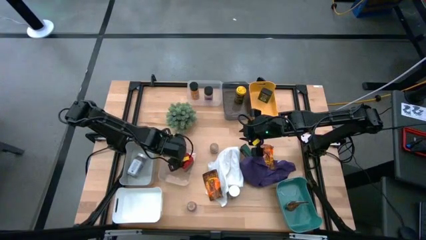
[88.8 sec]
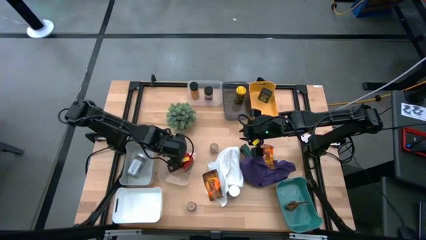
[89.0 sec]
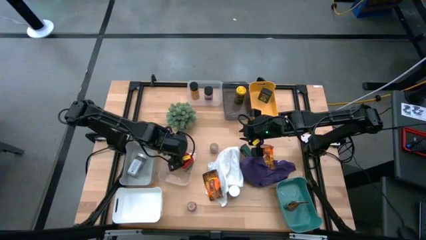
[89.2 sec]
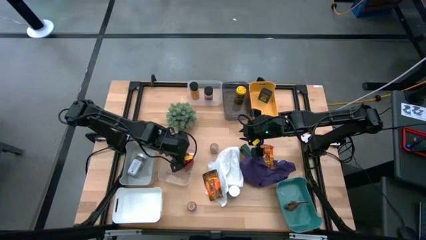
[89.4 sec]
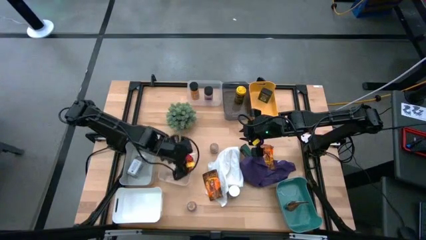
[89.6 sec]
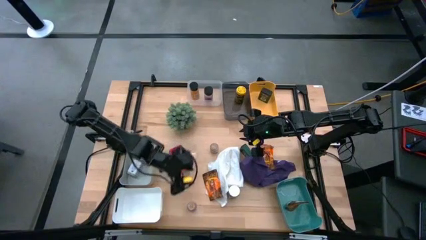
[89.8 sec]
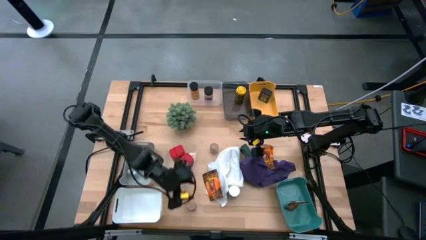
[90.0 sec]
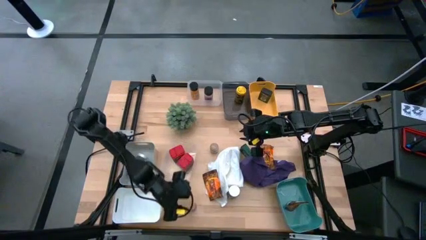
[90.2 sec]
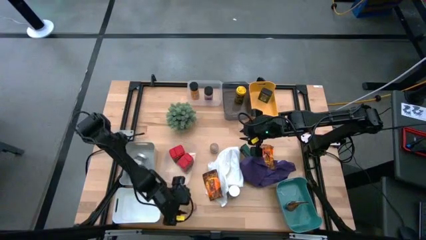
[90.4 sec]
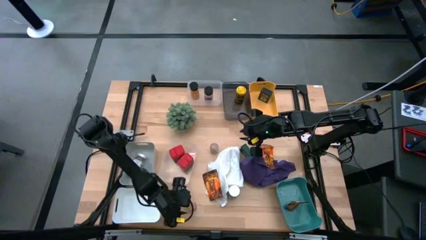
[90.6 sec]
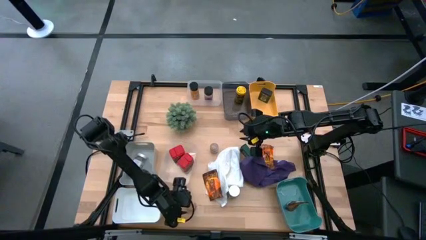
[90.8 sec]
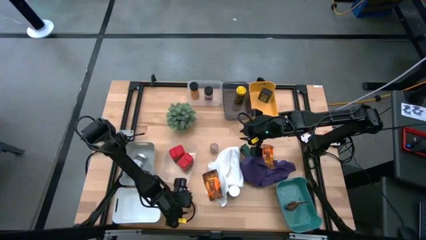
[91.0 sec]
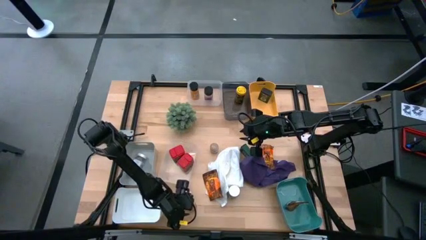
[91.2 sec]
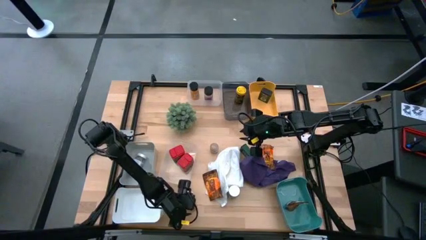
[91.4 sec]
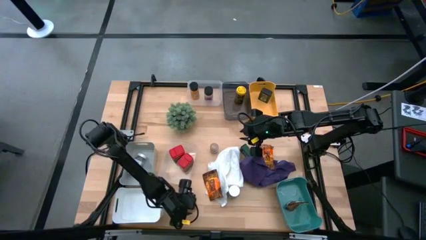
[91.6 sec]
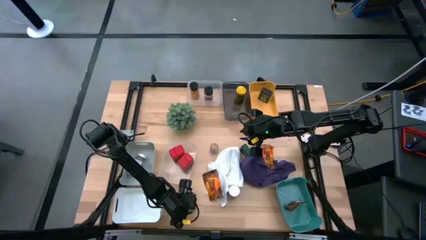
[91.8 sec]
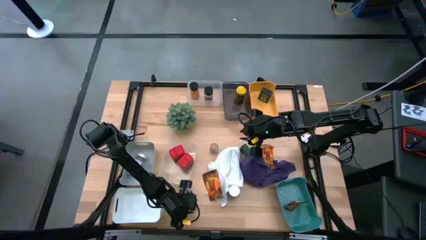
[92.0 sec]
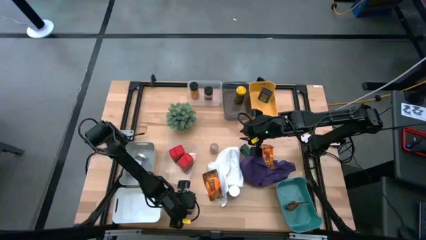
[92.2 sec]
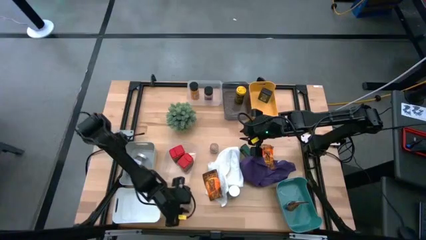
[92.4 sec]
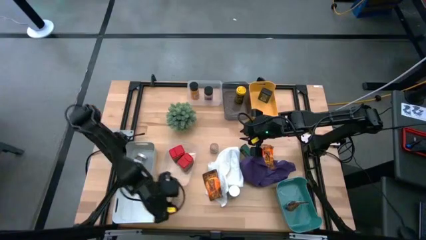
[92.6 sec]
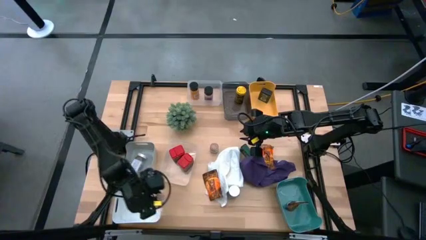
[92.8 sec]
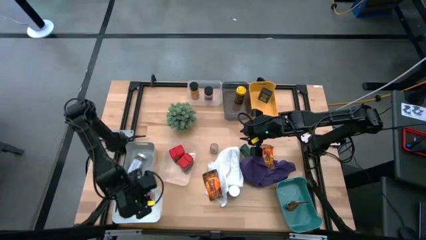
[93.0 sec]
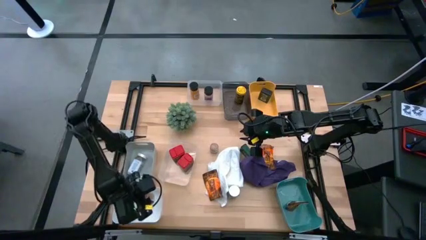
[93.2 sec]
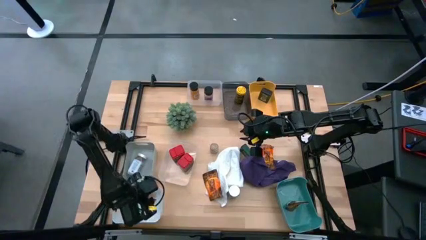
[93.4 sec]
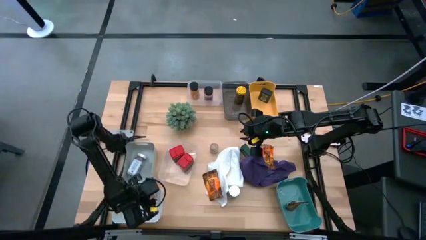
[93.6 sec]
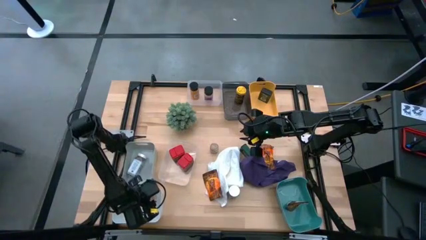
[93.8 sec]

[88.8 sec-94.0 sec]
Task: Sort spices by type
Put the bottom brown seasoning bottle into the white bin

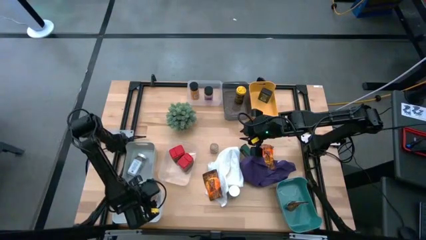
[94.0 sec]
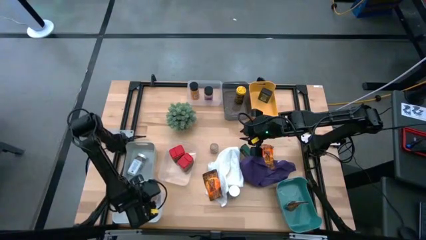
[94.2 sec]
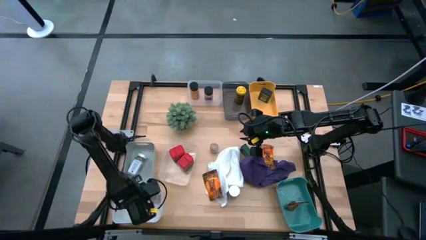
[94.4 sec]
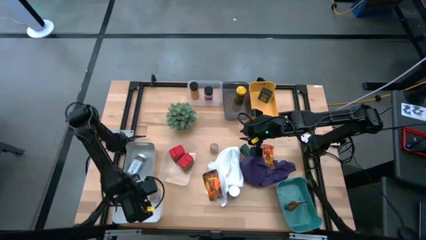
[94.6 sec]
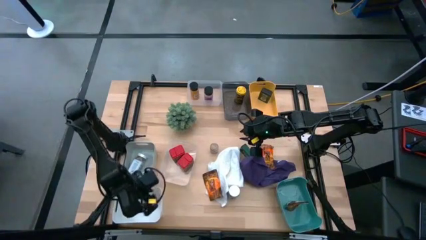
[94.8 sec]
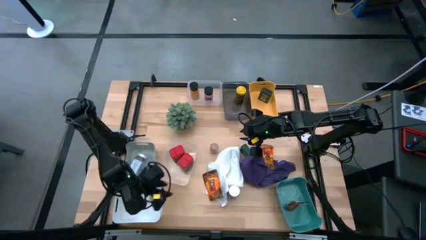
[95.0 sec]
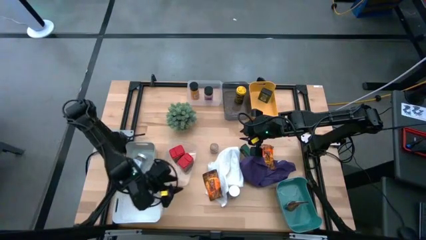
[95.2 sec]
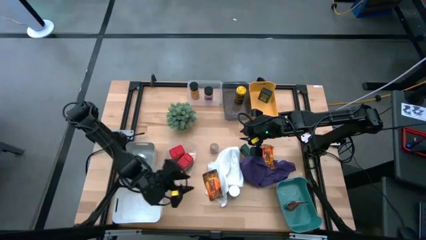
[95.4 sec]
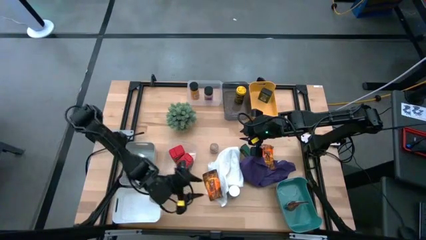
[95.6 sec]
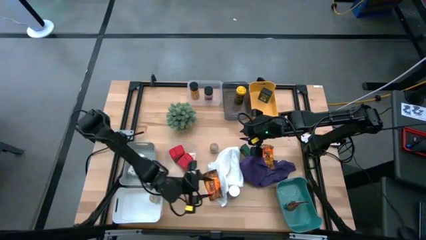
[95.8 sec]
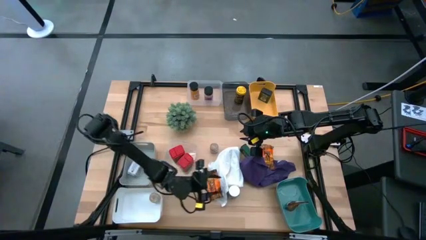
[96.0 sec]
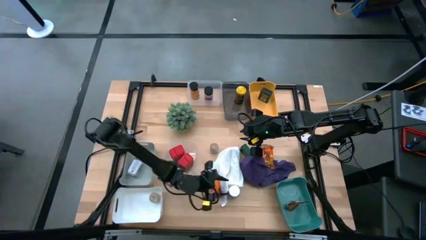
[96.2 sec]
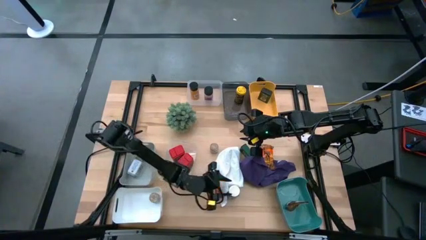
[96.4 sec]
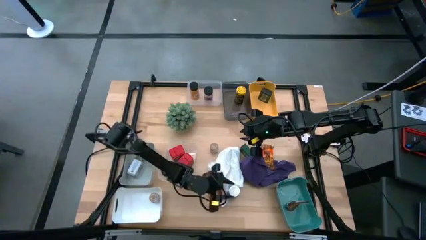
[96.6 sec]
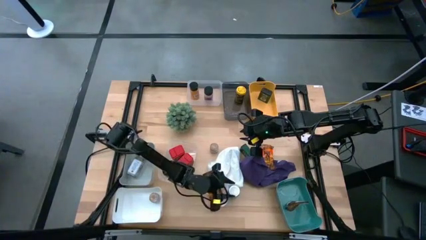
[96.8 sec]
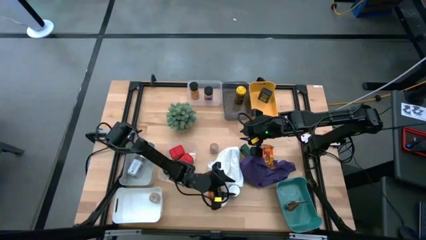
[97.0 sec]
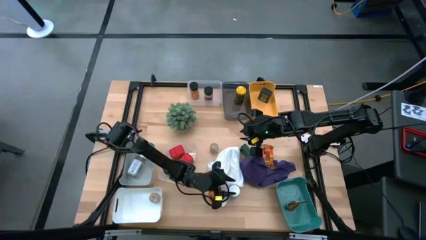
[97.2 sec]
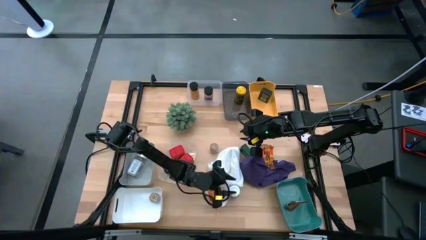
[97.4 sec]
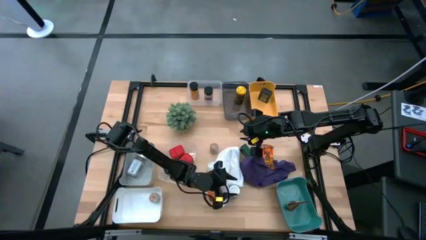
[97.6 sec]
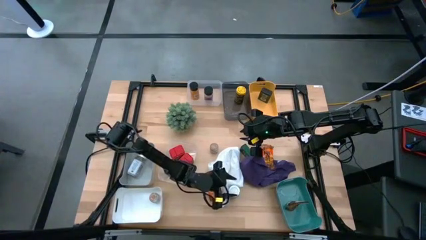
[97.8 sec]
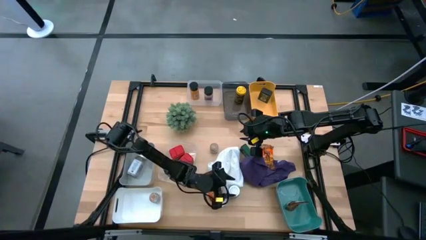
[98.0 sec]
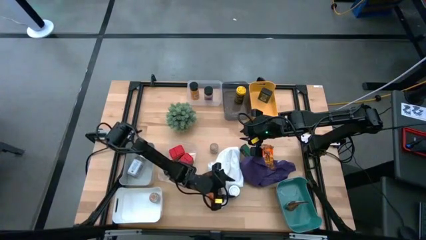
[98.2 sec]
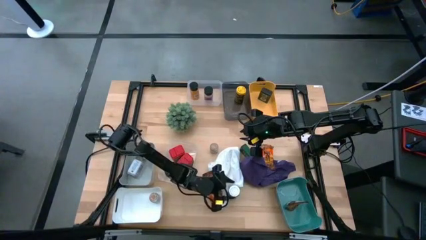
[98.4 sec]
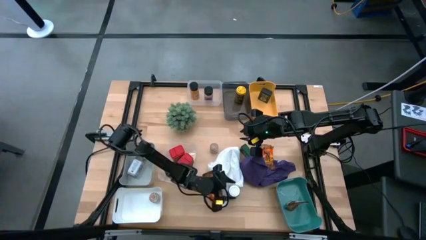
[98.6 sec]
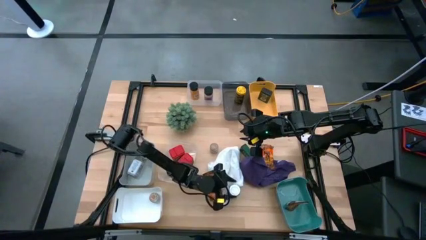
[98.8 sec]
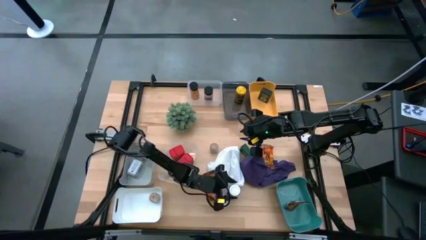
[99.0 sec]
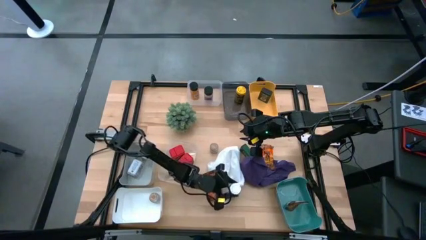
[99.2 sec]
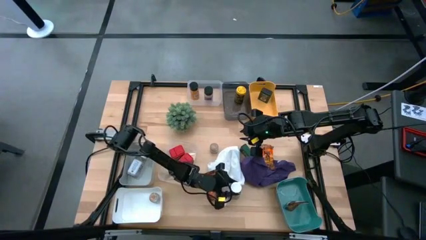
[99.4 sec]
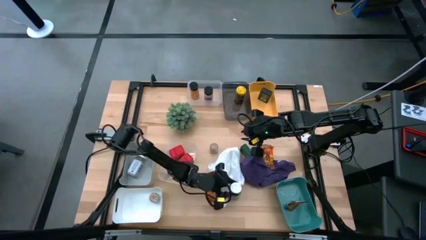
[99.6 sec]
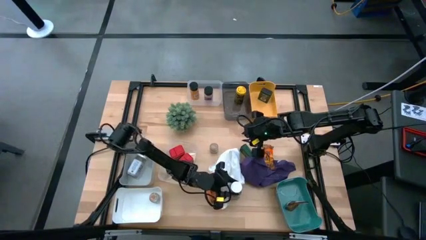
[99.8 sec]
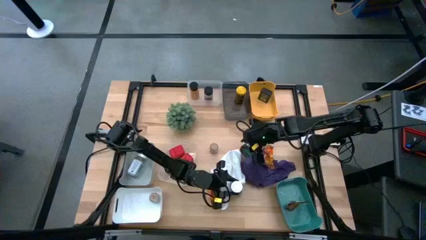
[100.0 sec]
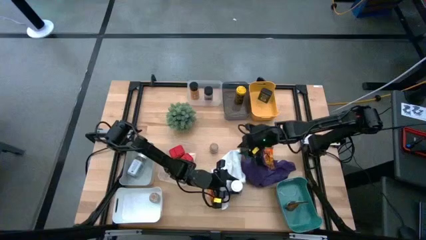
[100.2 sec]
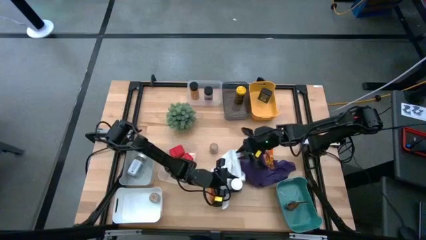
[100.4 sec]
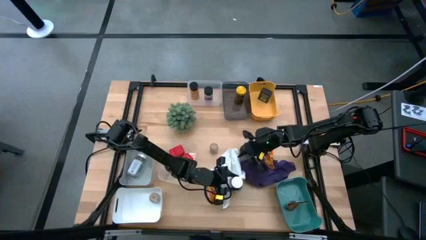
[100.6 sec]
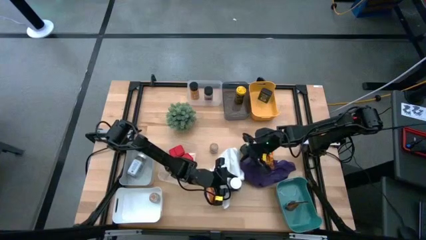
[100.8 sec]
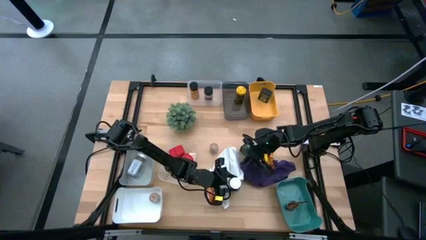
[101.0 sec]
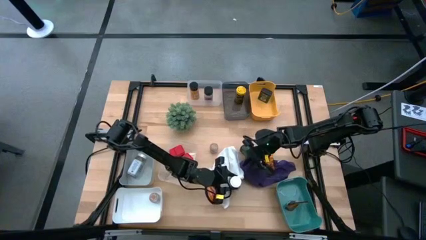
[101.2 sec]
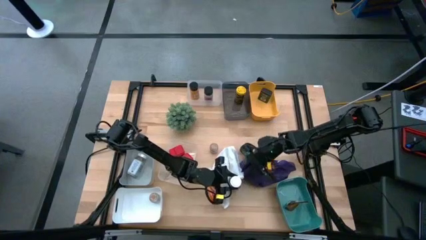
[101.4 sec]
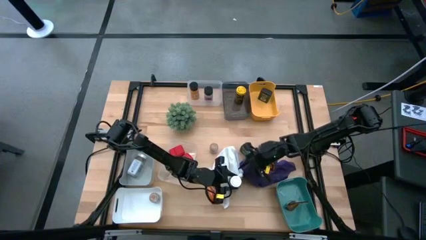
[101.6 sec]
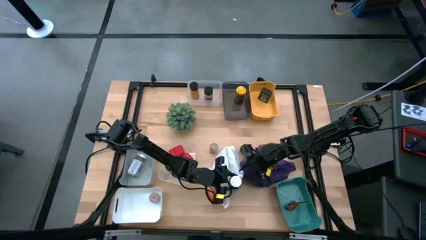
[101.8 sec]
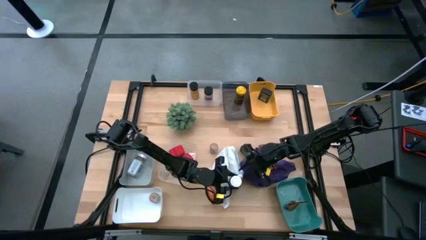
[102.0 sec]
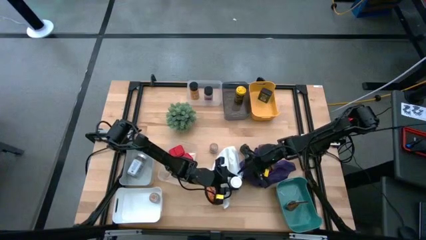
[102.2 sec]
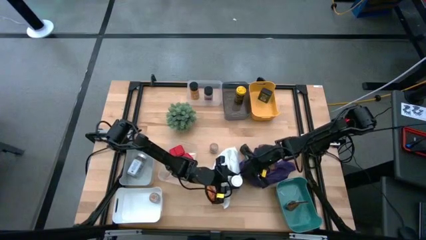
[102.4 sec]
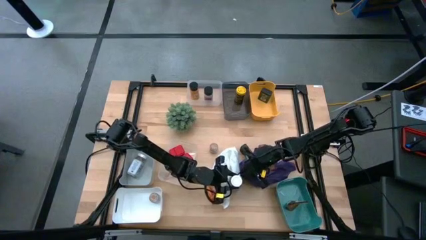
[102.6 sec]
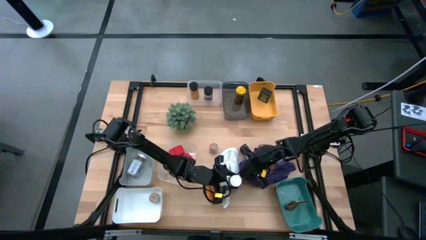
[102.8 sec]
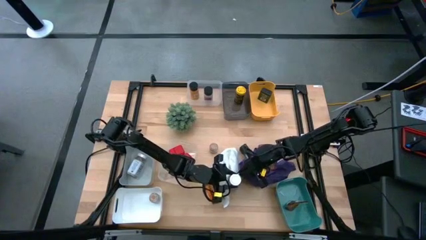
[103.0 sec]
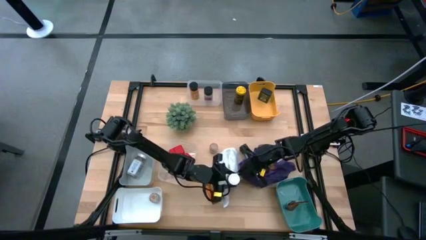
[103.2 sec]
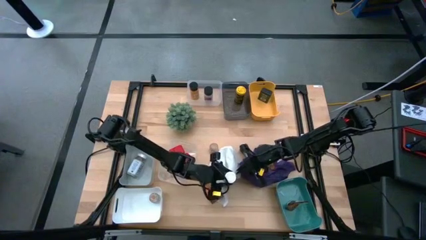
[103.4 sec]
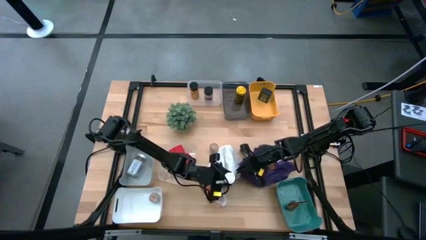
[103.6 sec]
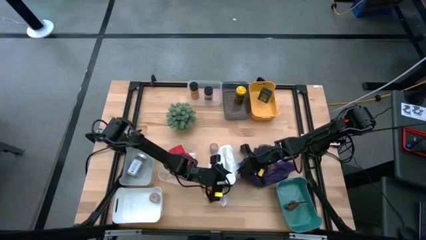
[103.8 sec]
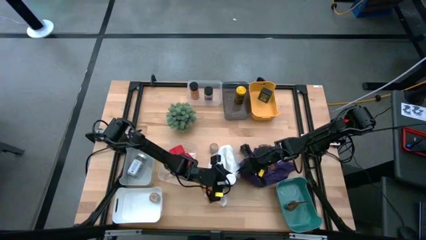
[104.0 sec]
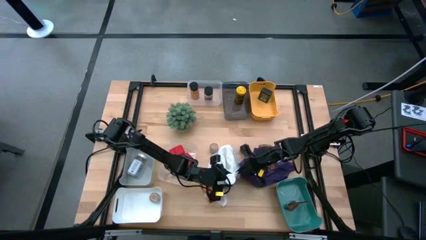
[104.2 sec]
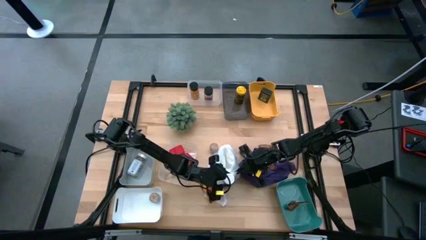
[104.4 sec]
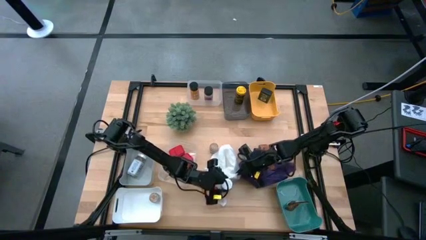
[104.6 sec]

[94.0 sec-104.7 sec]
Put the white seasoning bottle into the gray bin
